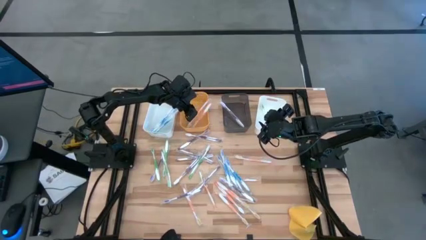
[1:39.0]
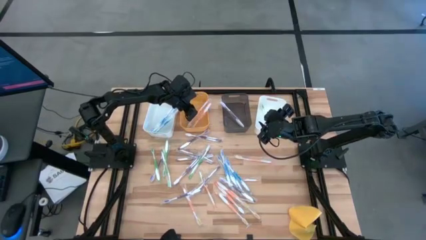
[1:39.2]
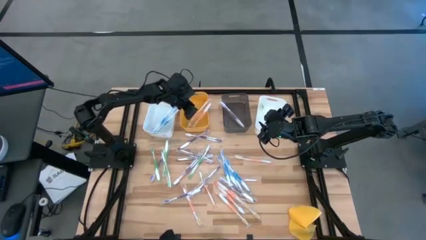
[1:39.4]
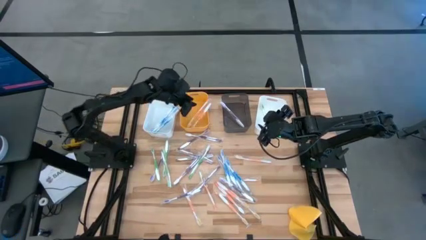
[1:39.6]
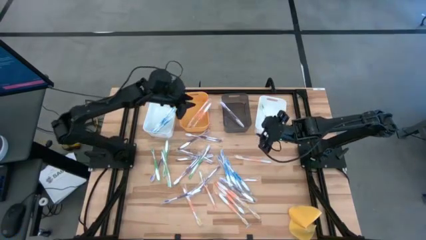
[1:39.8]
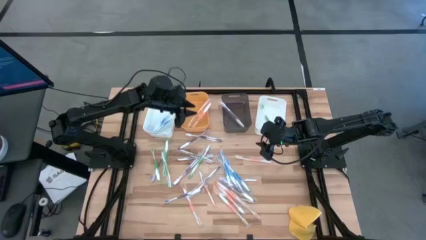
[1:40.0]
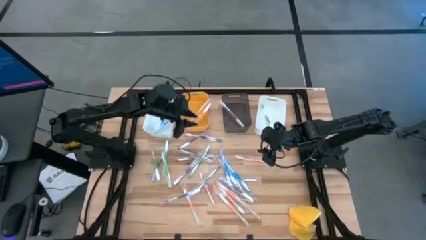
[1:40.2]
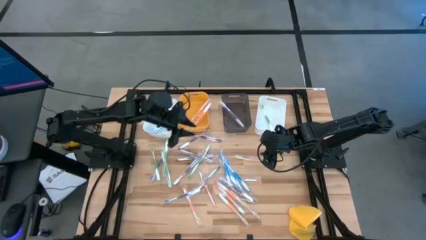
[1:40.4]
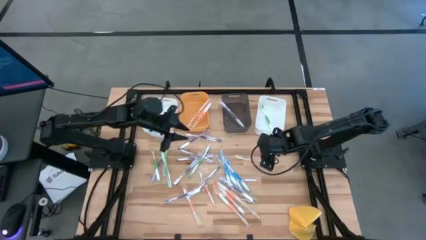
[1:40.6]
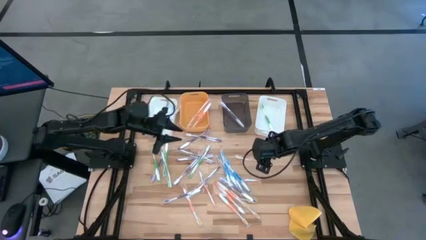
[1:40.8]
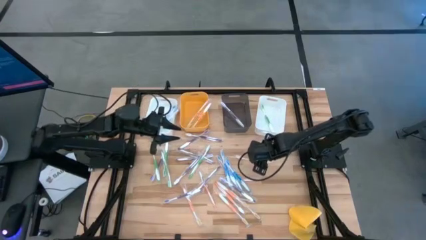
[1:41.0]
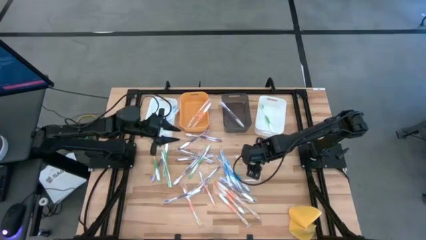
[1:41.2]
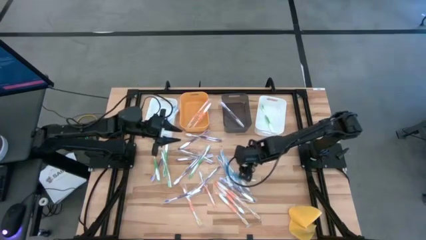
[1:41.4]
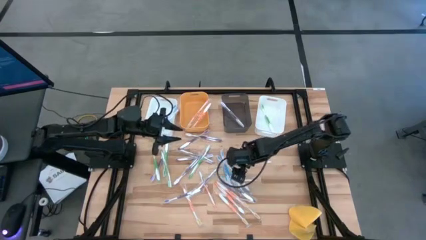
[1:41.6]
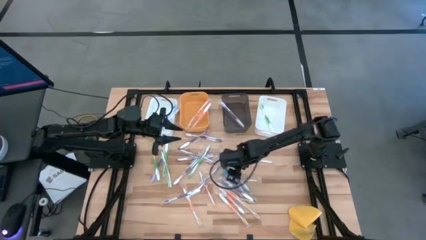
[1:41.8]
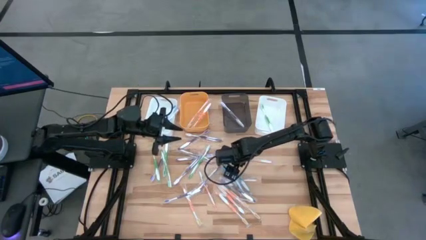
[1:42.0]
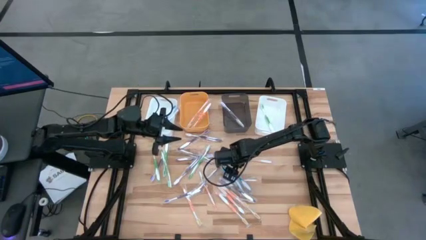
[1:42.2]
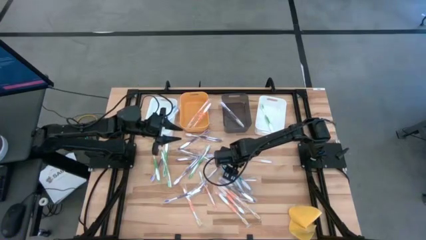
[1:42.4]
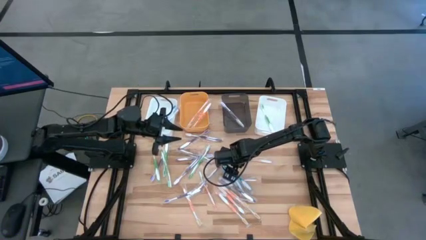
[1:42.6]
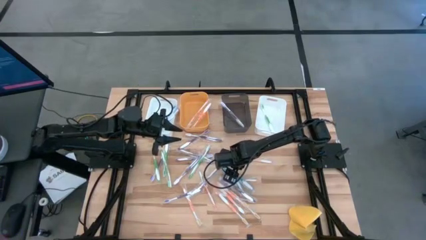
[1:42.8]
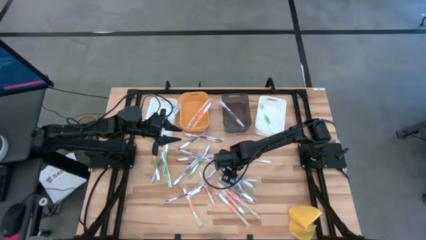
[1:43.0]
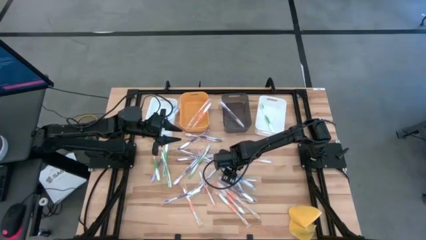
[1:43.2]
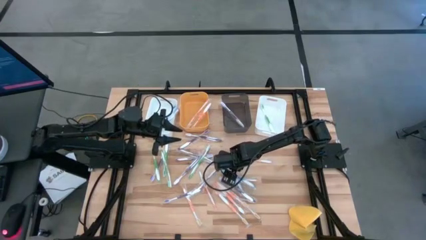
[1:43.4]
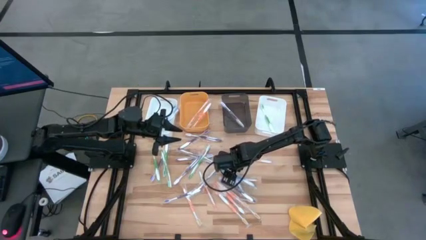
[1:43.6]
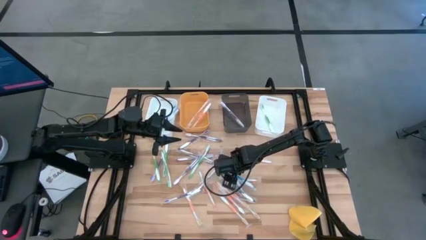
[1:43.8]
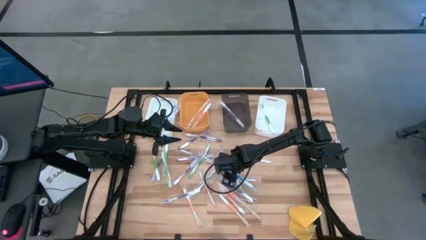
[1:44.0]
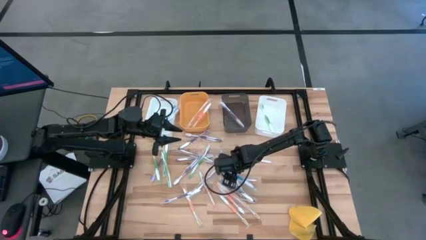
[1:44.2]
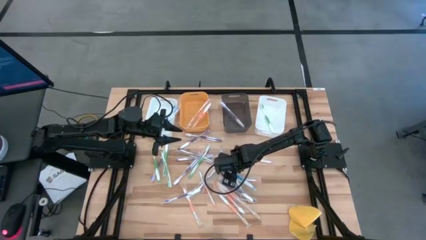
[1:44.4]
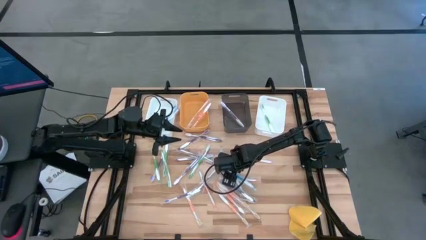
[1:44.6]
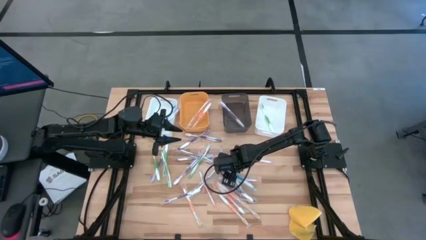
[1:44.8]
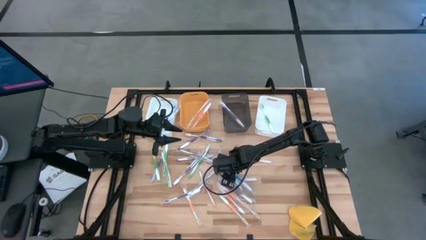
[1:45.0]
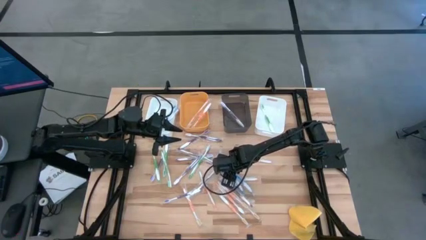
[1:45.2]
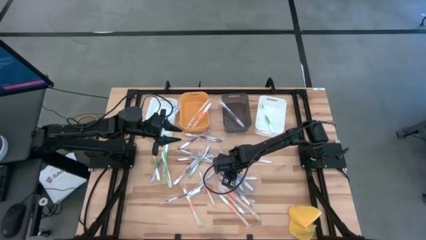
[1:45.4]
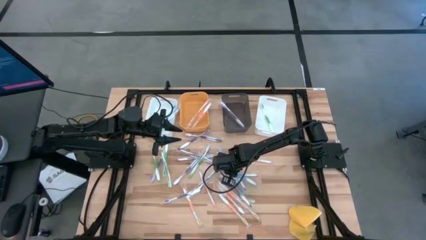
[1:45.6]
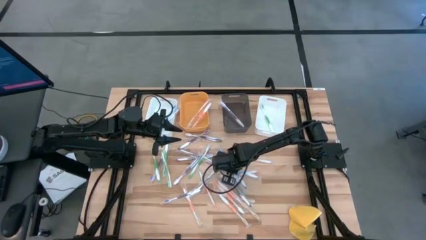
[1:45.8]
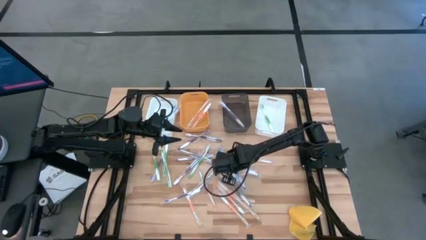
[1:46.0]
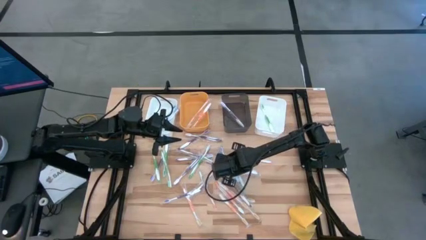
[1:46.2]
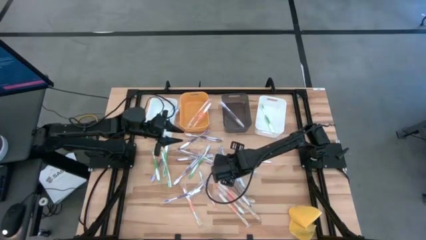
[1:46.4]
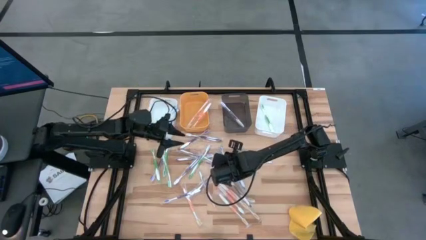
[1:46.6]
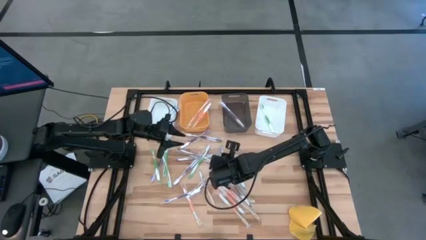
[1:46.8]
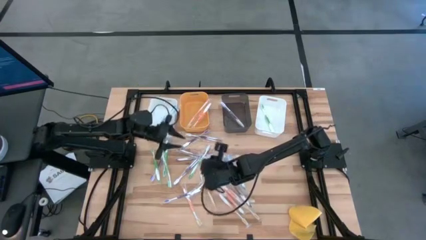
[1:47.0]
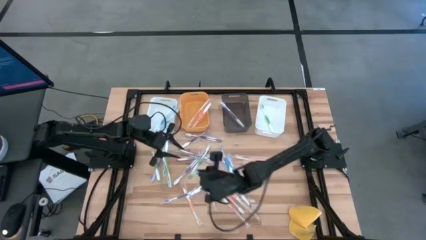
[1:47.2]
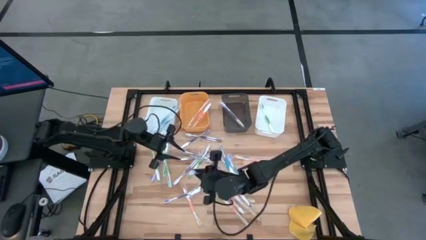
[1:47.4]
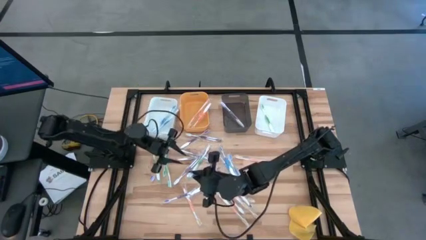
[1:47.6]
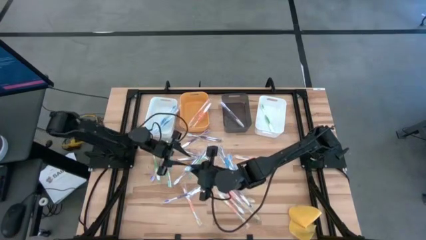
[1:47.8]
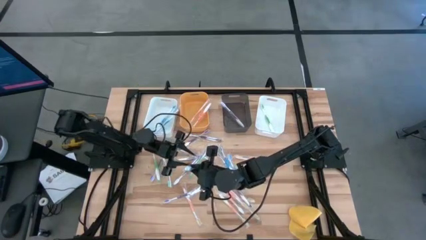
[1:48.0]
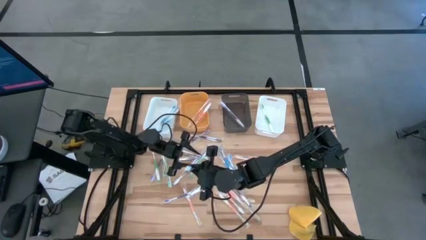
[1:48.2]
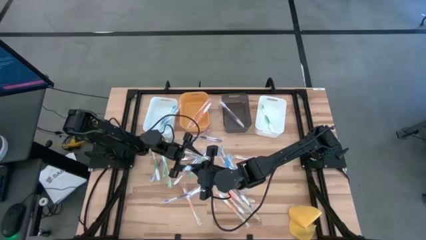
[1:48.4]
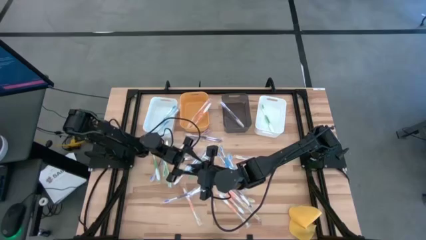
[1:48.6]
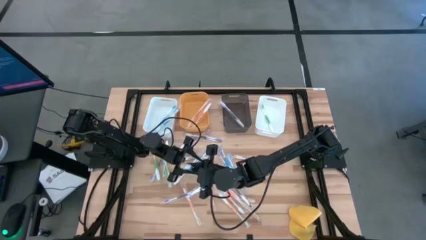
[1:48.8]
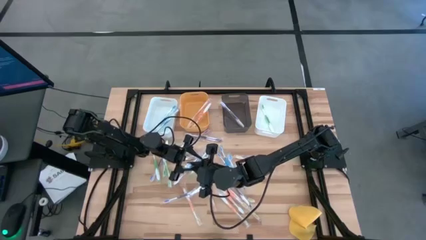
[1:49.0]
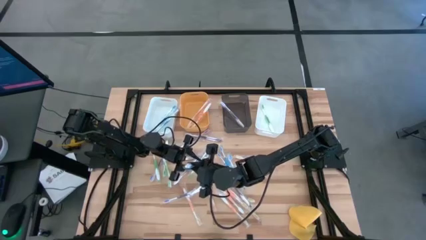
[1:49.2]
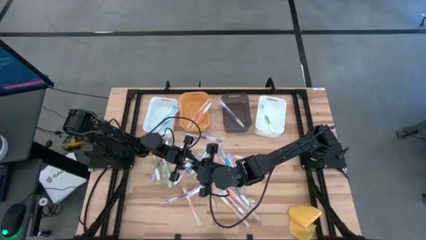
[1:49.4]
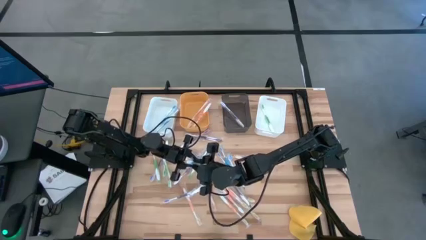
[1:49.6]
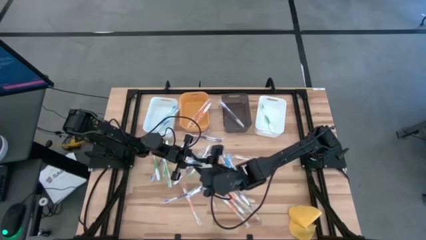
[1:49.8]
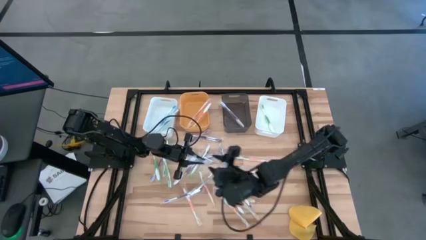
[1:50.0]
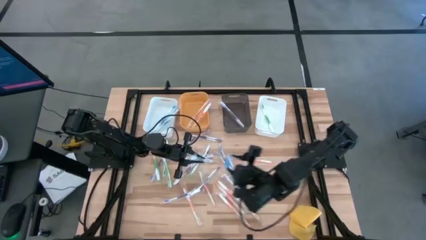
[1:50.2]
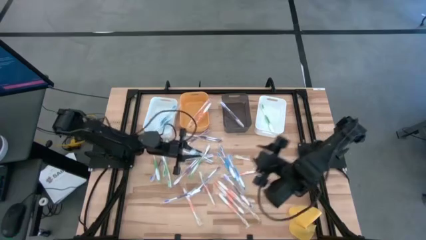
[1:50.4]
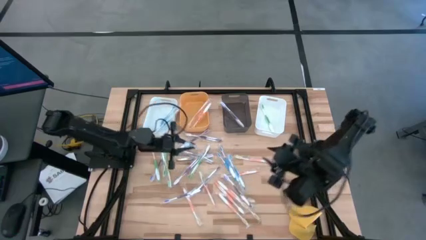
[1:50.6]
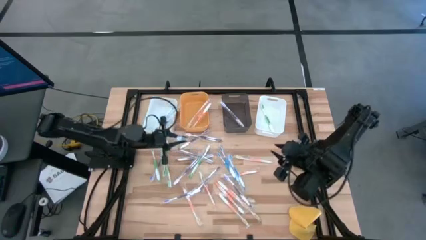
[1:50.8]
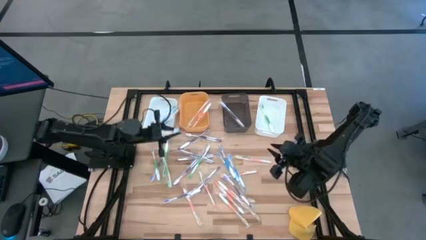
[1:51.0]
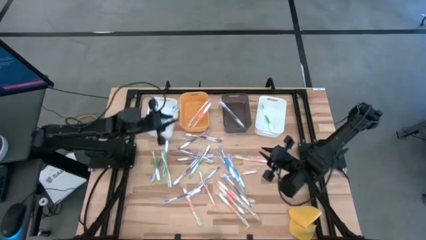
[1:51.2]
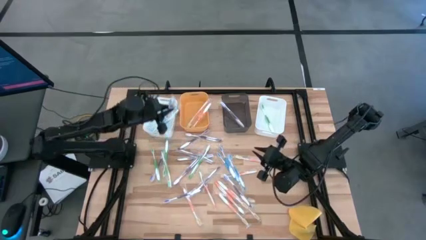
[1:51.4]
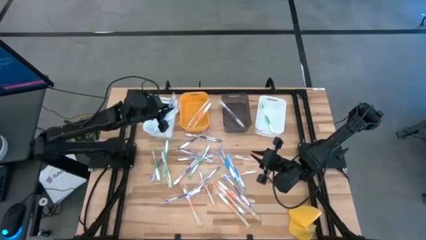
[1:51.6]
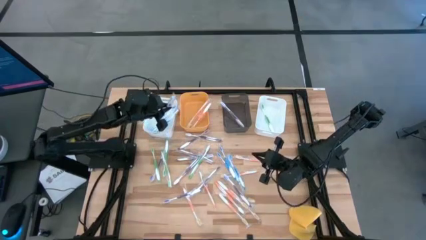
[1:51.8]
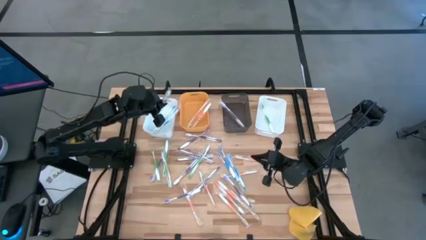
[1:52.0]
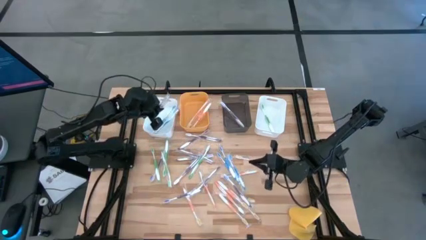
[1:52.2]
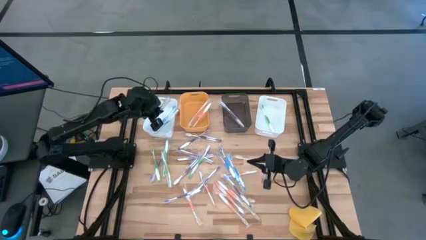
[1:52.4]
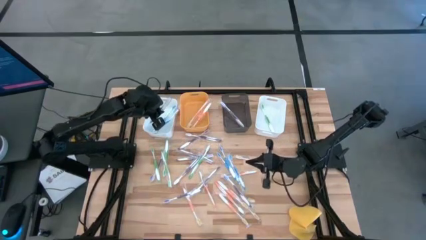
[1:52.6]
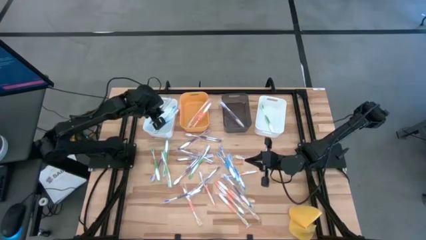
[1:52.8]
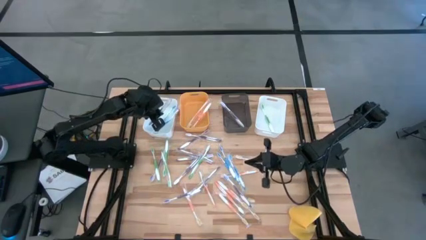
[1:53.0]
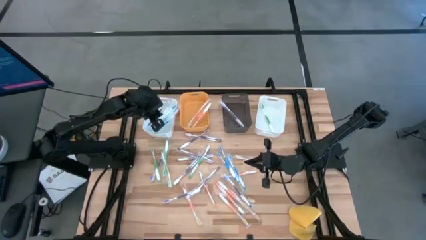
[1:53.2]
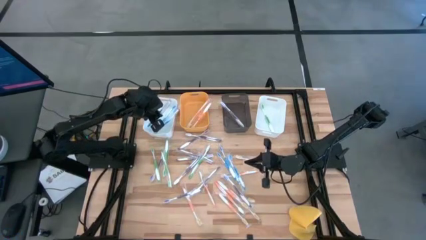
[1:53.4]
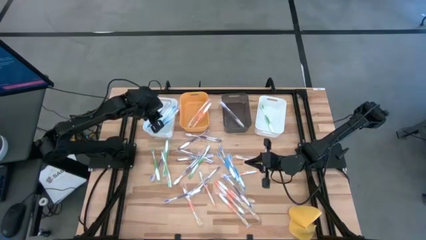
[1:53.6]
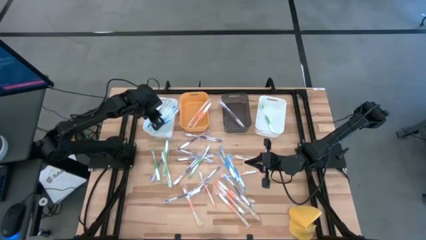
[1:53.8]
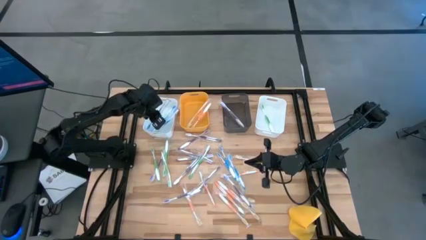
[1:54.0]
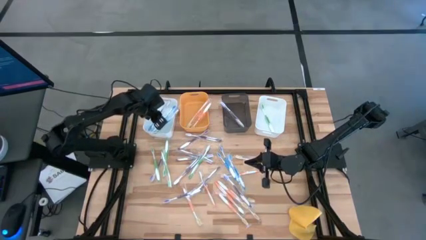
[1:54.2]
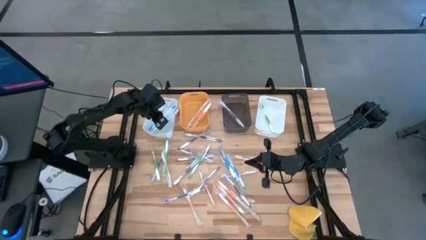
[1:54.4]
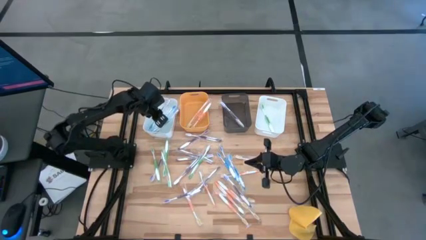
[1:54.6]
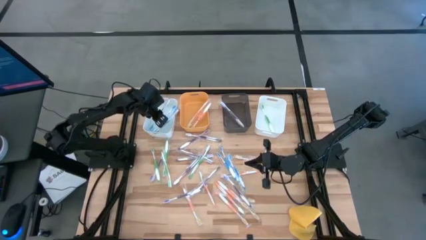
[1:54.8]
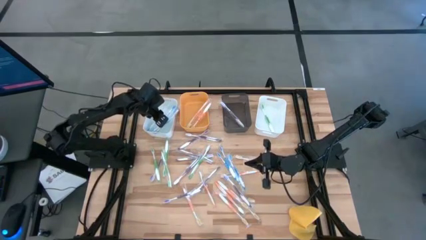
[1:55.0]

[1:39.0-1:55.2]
Task: Pick & Place Toothbrushes
Put the blue toothbrush into the left white bin
